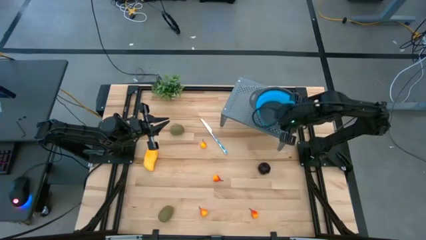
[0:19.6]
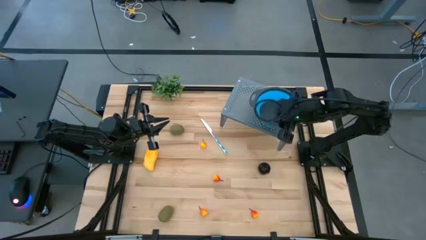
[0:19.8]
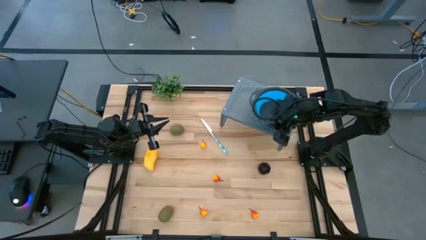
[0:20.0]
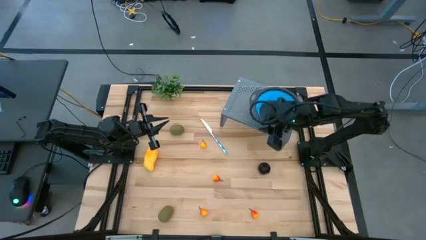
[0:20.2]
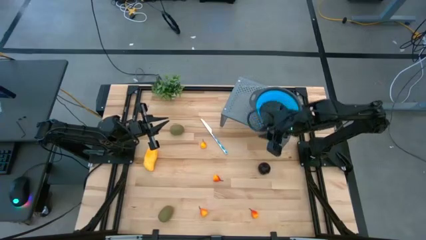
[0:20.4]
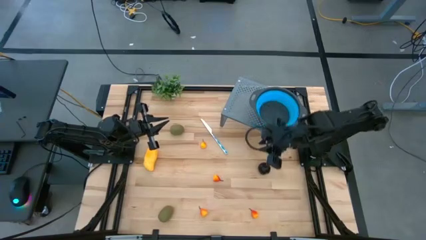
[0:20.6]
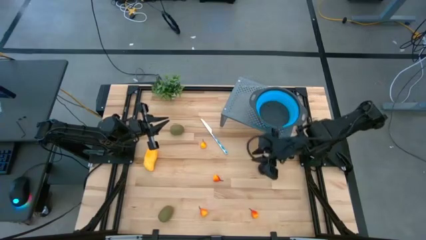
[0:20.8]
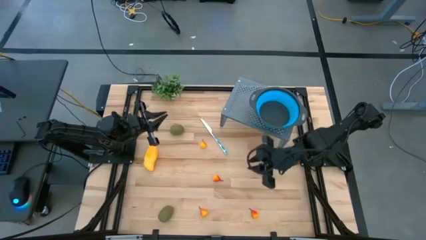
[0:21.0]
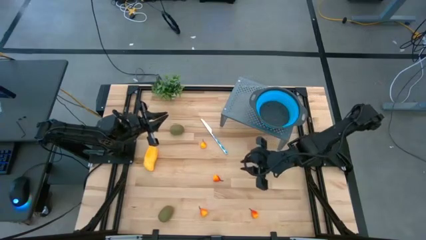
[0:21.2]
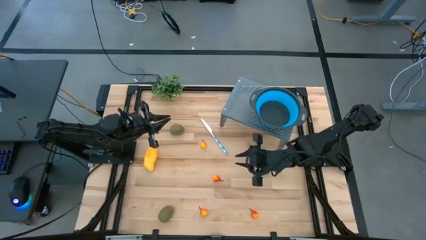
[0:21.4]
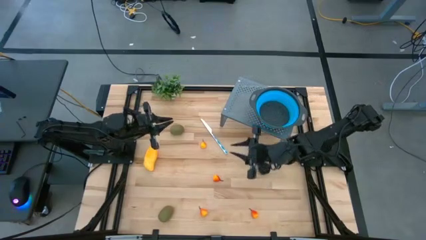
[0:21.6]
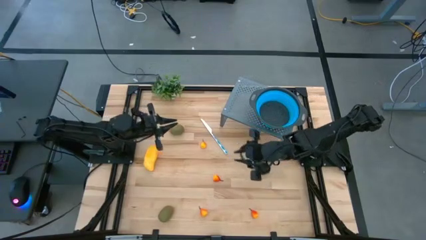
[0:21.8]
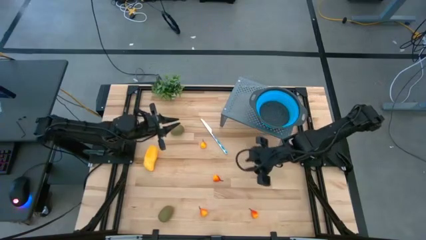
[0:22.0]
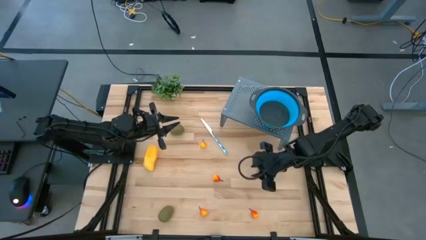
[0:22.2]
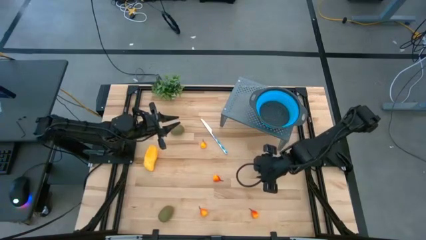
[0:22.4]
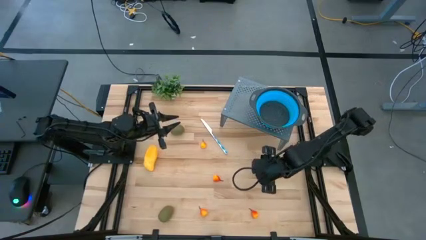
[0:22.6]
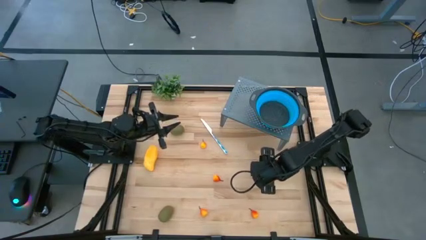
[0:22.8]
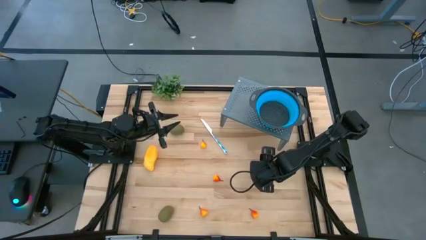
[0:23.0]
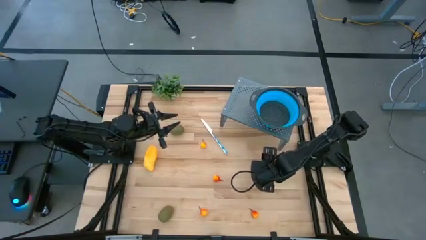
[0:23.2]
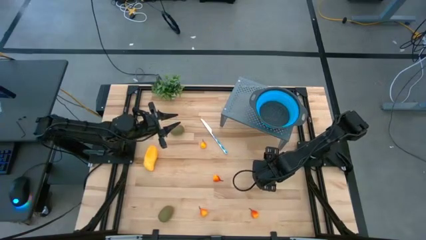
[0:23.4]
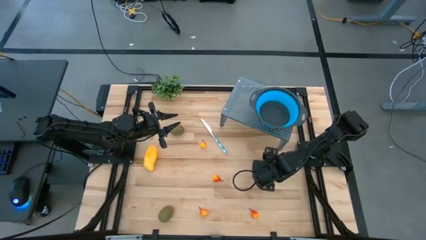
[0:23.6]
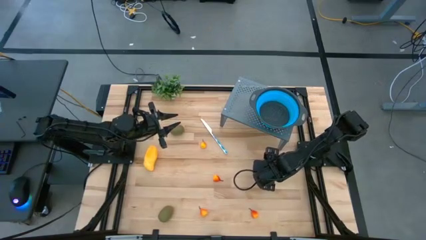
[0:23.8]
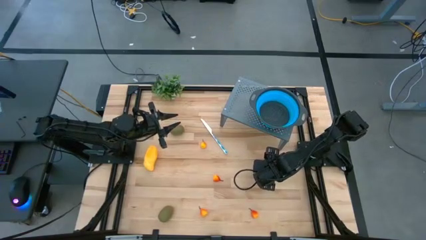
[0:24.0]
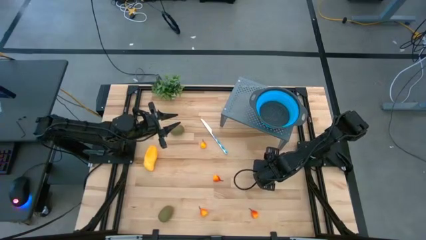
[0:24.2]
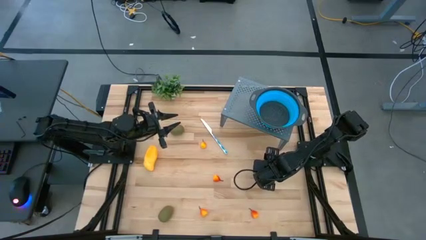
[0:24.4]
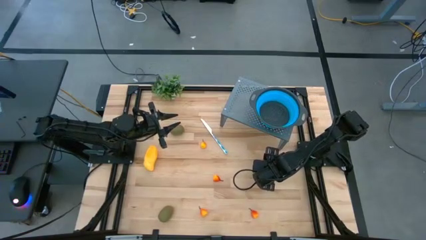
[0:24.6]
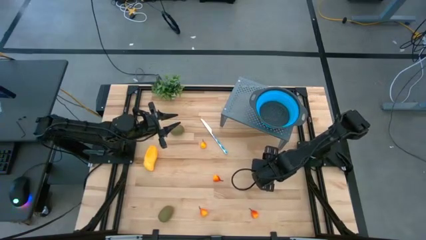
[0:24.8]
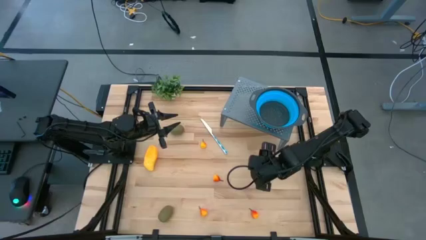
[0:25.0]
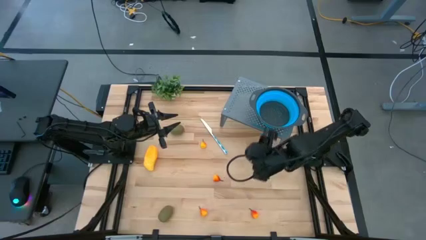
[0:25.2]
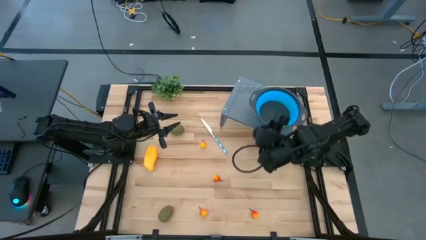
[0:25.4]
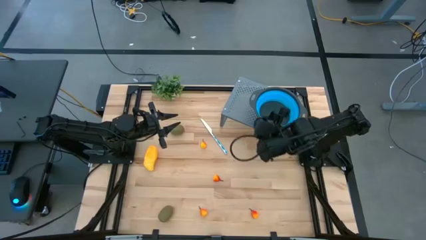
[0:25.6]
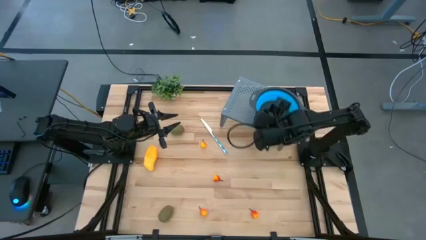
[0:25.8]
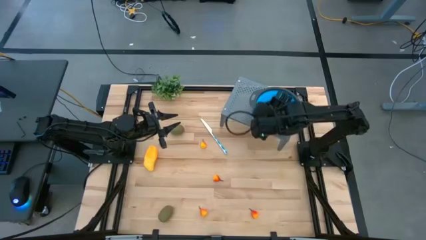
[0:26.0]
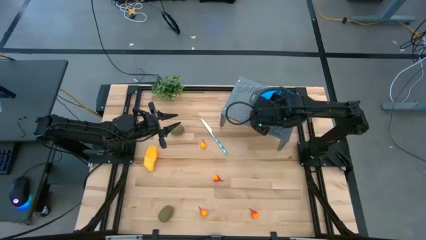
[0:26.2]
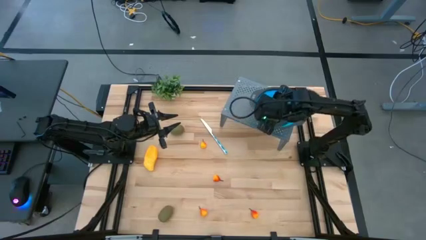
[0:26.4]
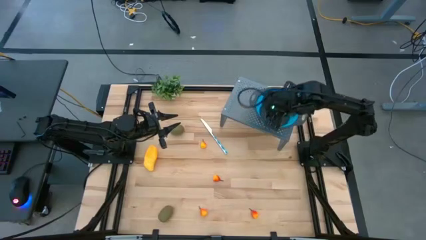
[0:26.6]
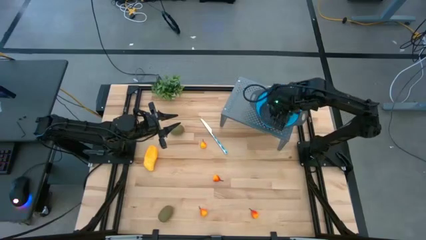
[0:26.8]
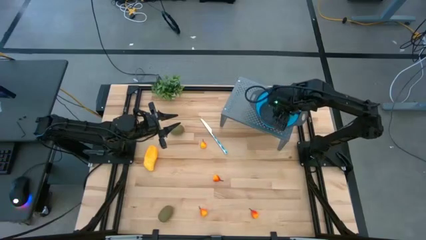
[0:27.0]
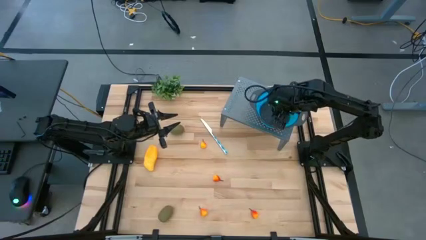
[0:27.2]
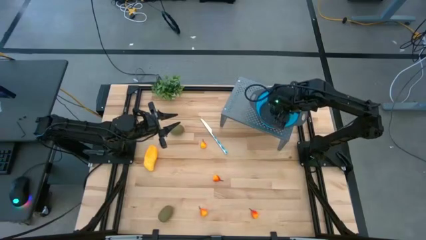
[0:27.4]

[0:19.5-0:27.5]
Task: Pick & Place Fruit
Put the plum into the blue strainer bowl on the shelf

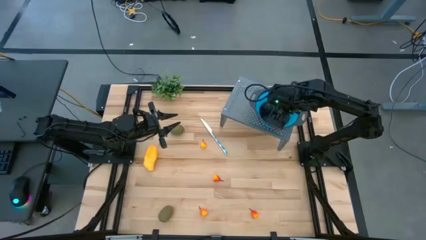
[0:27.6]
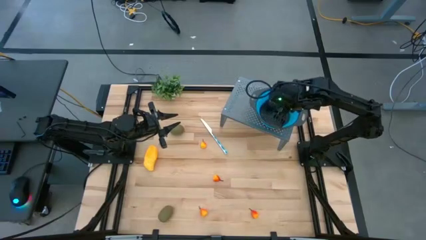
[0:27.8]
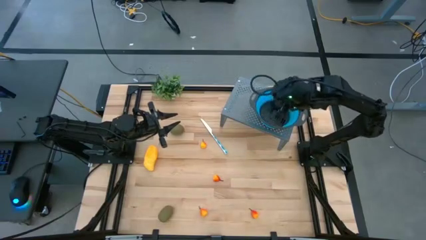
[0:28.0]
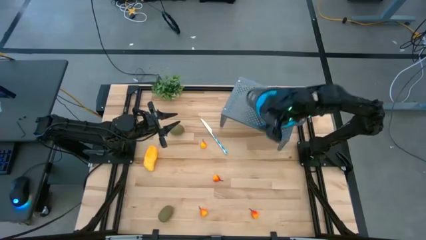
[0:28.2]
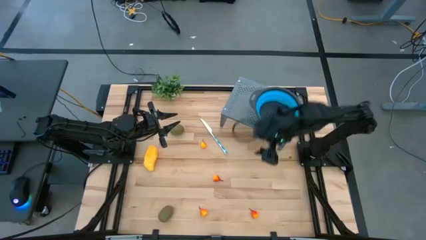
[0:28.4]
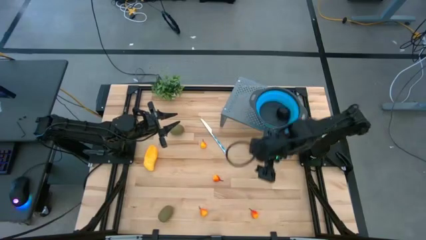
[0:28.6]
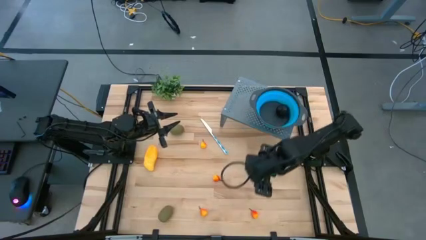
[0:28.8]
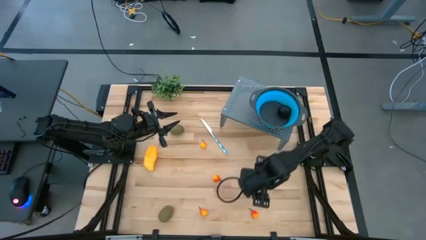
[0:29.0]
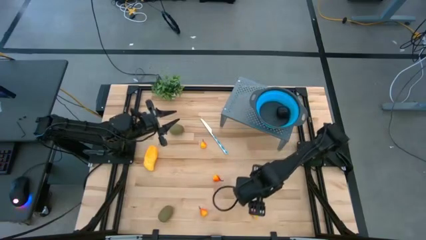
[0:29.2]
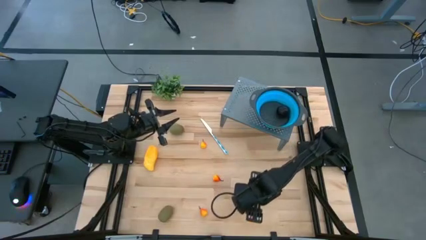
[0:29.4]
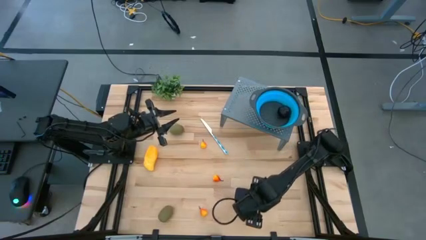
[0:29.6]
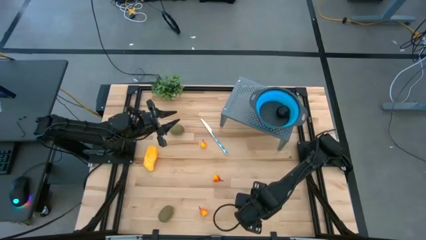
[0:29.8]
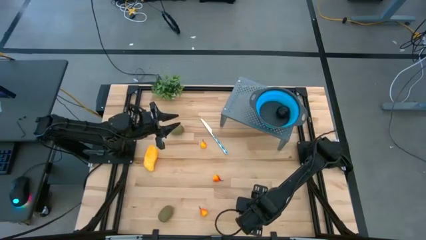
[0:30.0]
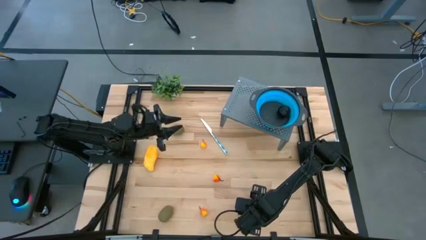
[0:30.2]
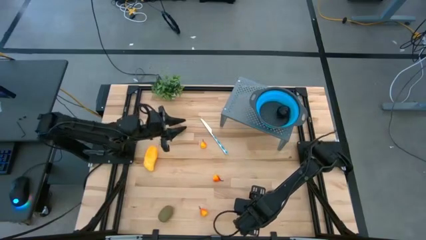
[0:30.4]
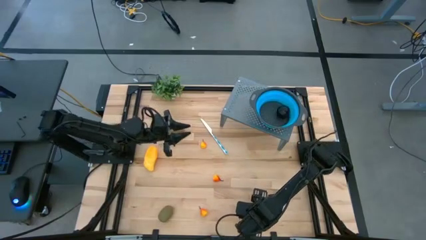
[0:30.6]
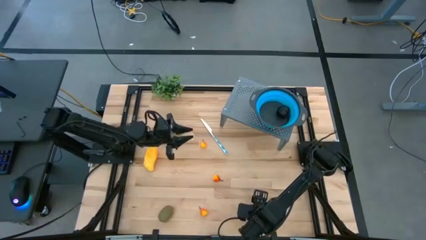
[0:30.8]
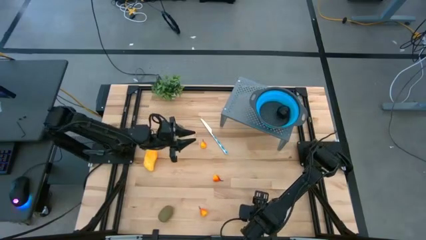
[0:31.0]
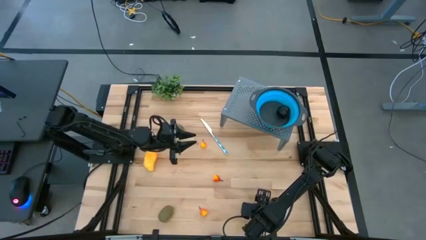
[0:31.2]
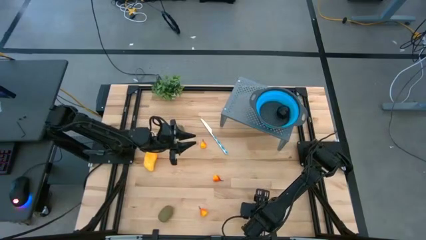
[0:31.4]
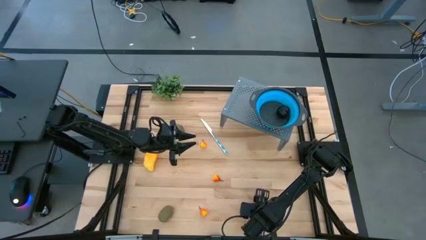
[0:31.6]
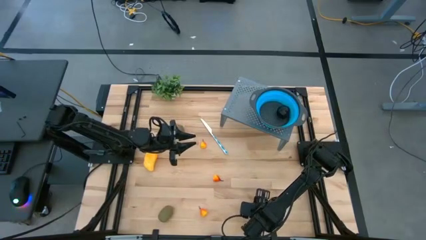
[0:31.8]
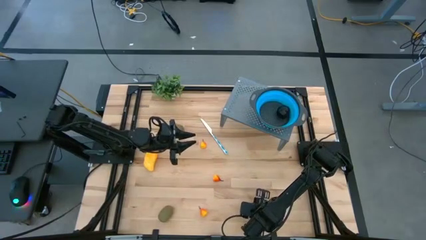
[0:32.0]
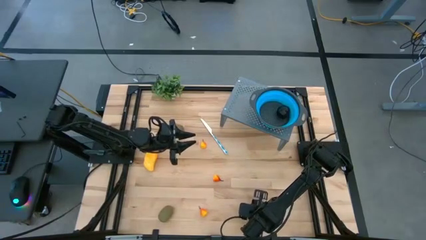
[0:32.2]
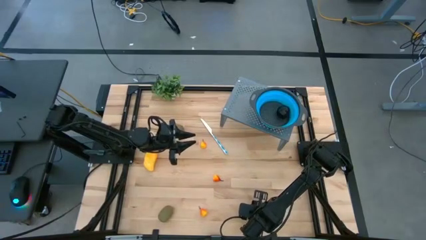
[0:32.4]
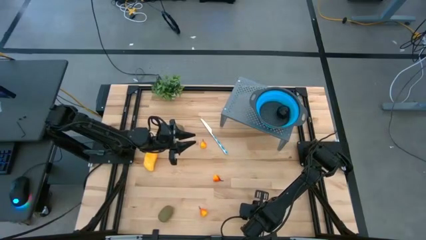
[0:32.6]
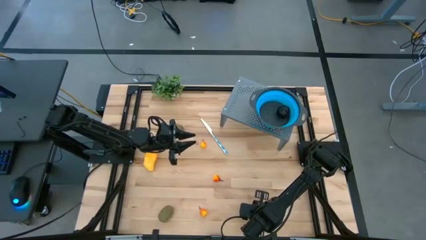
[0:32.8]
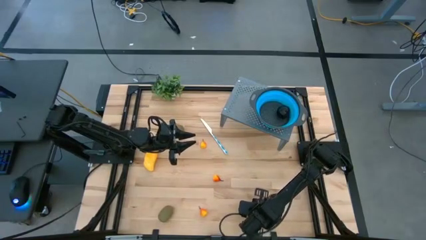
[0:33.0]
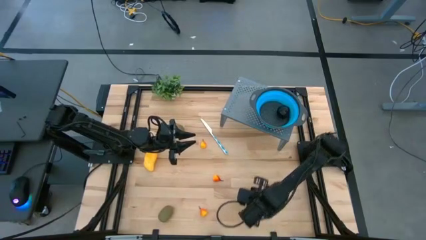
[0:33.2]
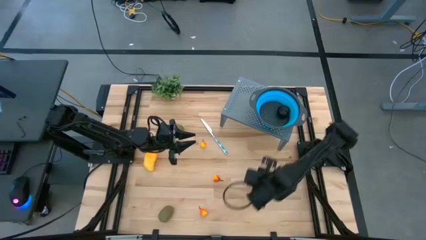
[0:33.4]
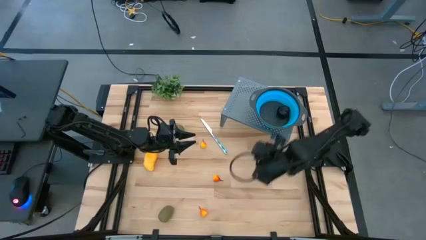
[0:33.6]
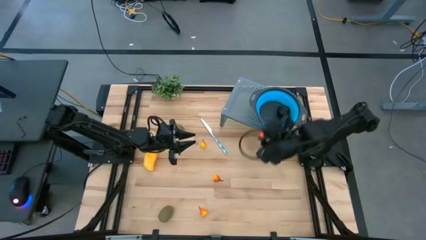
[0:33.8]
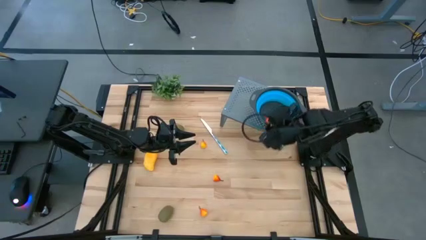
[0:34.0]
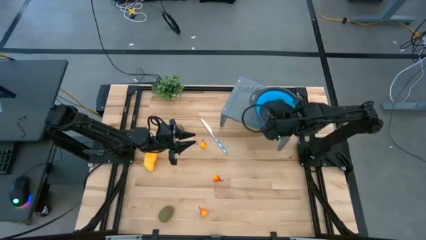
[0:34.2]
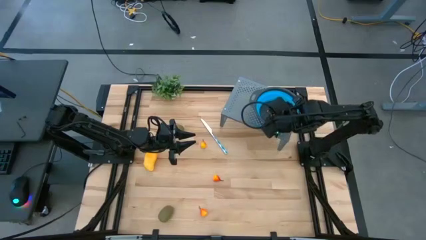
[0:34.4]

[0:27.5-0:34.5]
Put the peach into the blue strainer bowl on the shelf

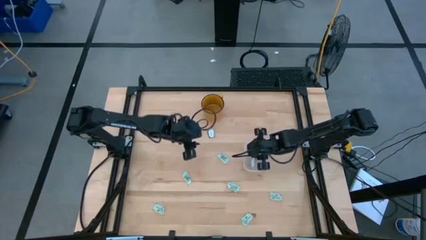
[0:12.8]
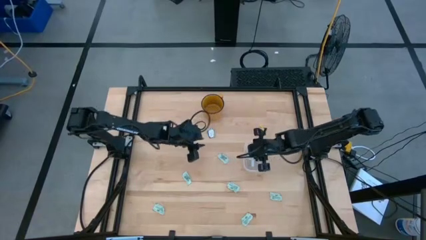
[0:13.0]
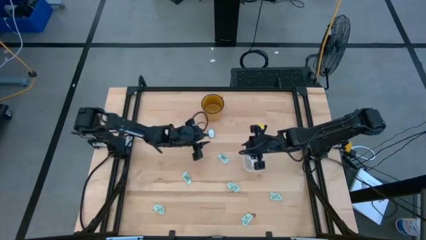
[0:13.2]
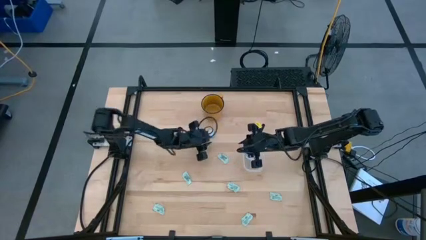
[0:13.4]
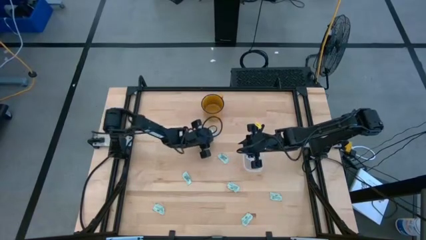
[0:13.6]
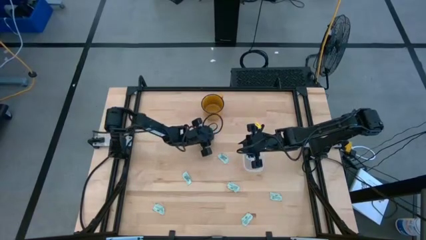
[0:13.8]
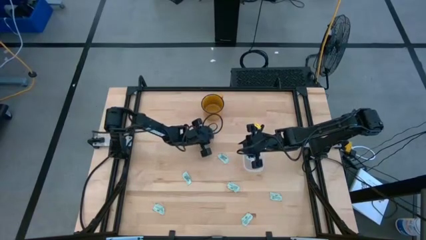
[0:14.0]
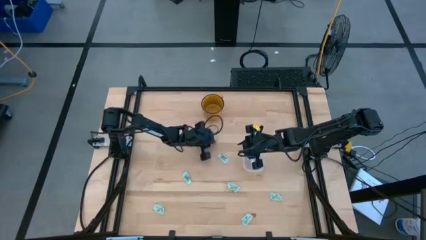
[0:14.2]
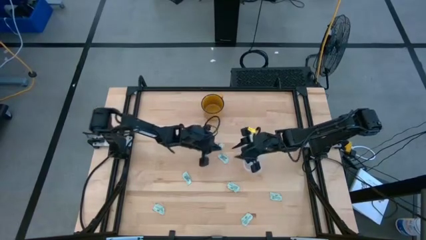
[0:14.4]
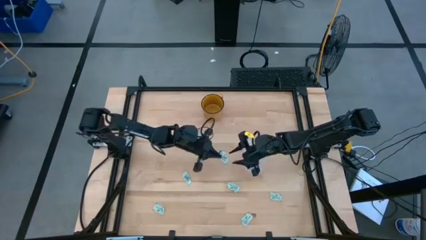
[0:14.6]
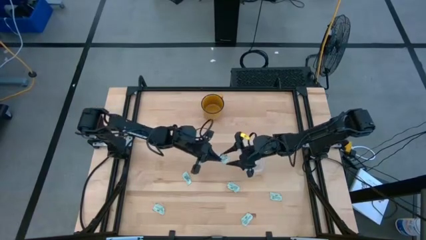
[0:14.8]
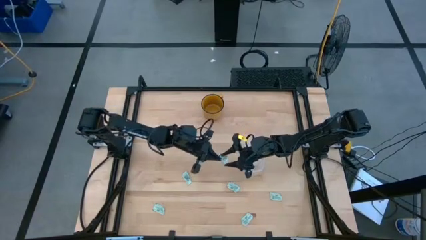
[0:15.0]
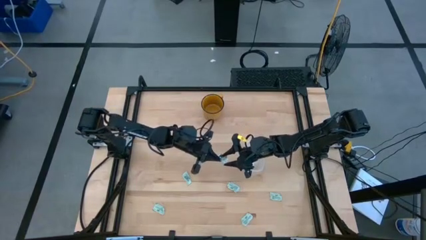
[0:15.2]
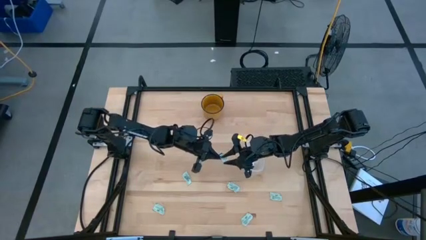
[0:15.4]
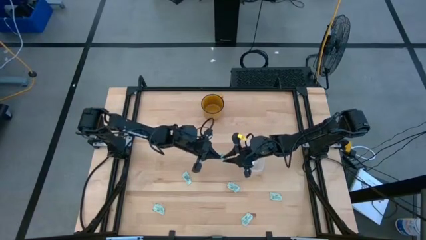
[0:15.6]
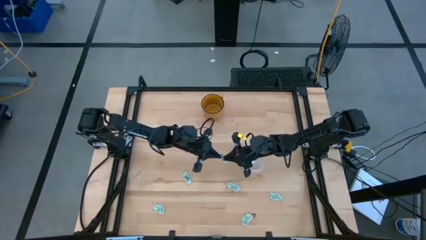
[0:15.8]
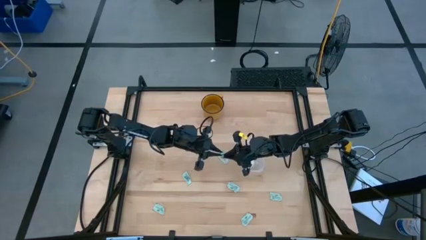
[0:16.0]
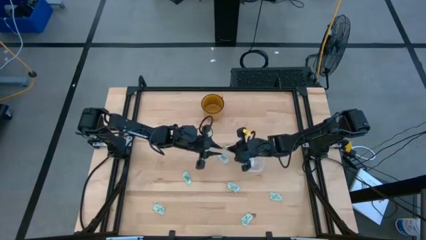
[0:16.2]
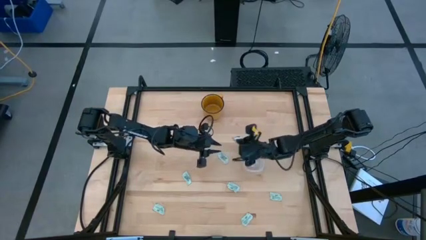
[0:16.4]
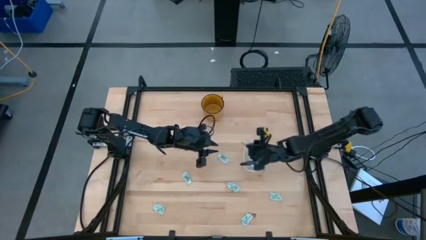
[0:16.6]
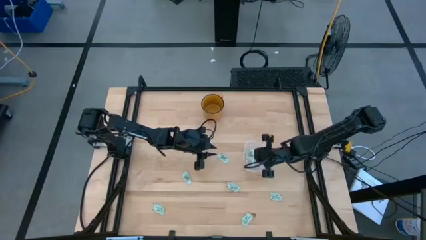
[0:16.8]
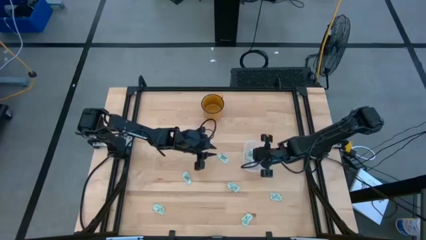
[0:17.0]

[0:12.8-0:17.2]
Task: Pick and place Stevia / Truvia into bins
Put the green truvia packet into the transparent bin
